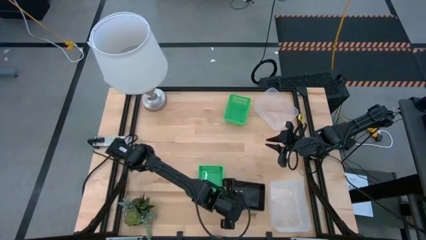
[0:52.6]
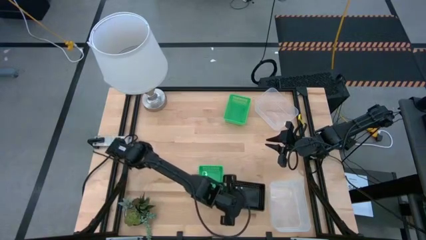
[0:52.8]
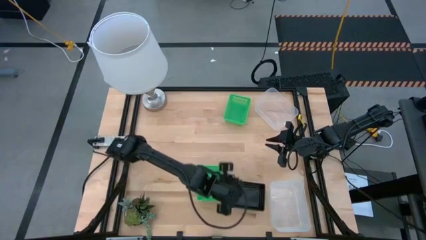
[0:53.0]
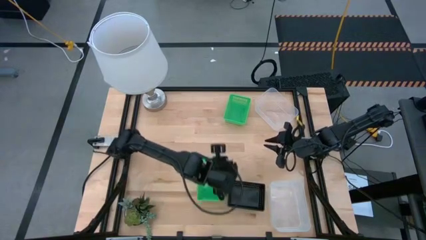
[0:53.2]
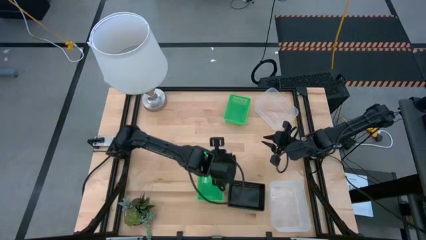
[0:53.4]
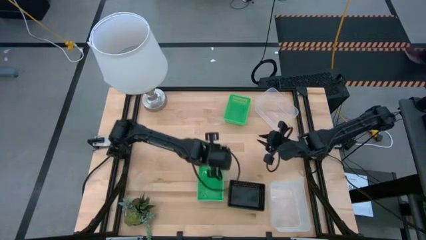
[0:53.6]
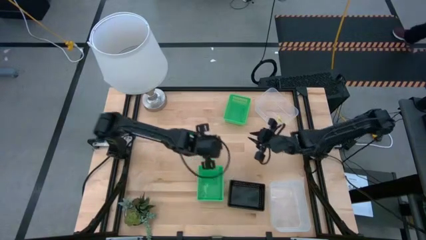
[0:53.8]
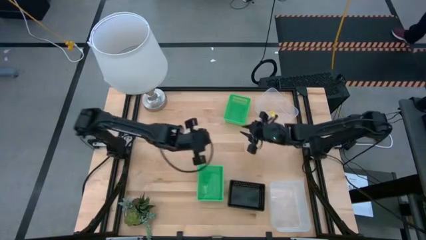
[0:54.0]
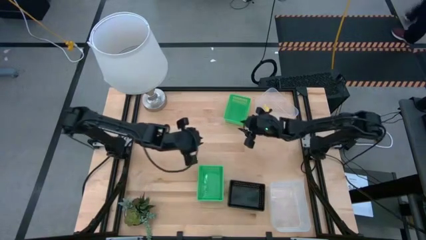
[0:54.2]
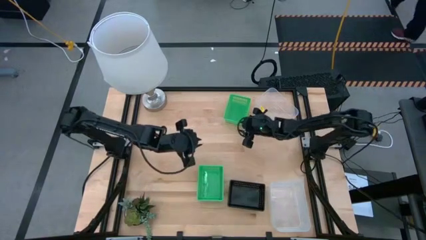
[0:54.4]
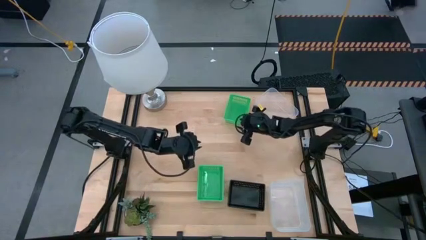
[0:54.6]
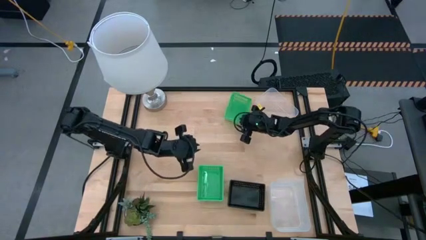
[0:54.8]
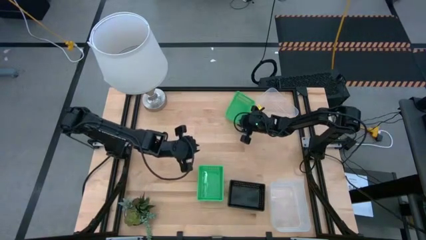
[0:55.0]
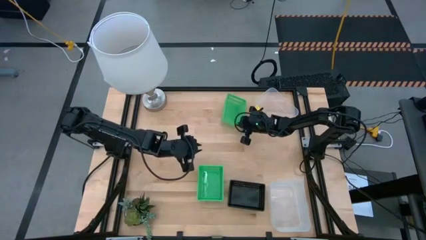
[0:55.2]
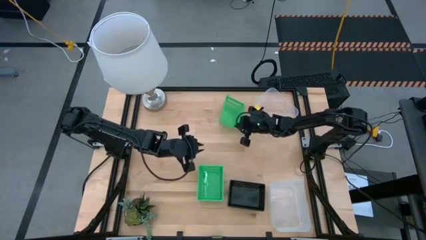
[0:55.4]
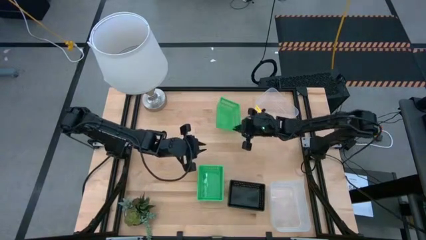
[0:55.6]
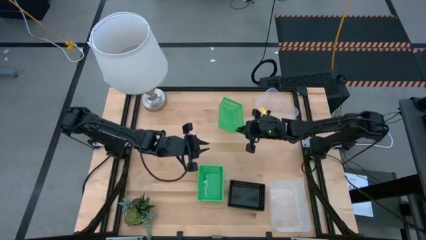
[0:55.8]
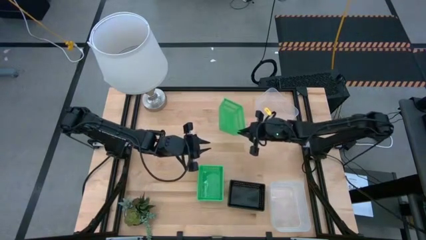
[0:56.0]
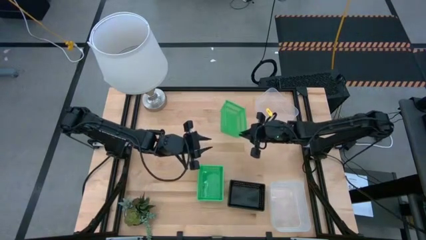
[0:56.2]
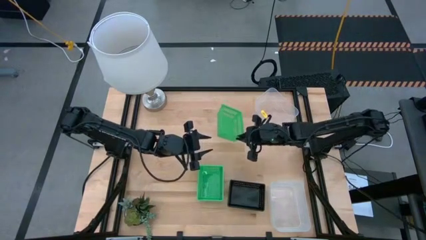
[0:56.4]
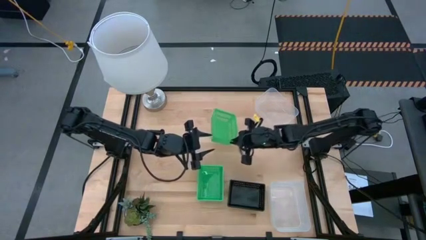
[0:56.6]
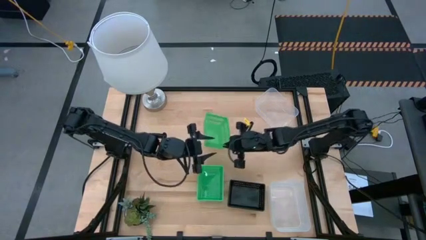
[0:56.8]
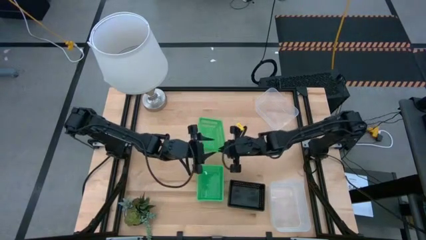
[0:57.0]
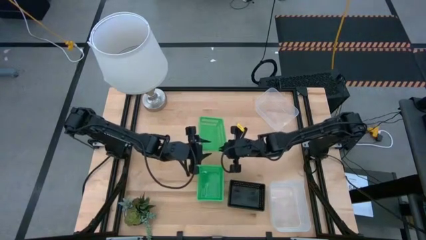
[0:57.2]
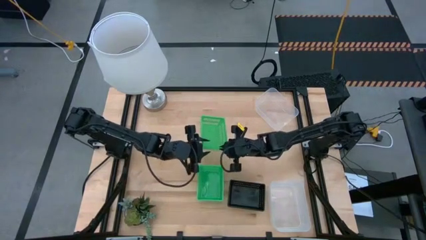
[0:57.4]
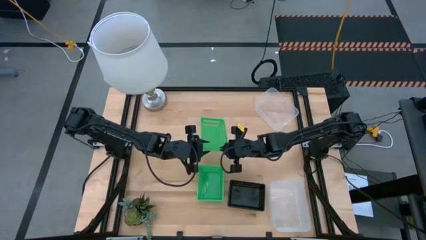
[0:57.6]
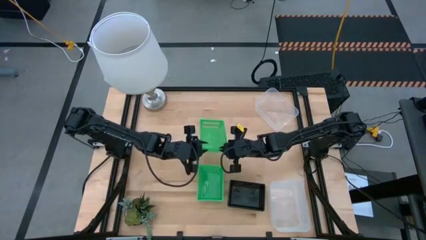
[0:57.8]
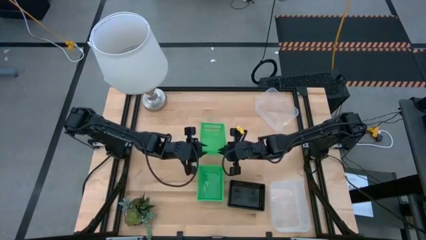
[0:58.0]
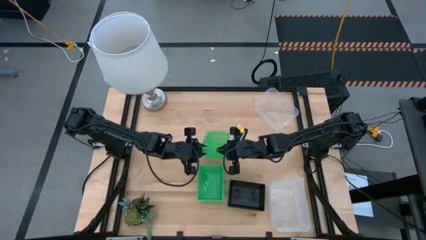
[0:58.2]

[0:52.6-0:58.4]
Stack the top green bin on top of the bottom stacked green bins

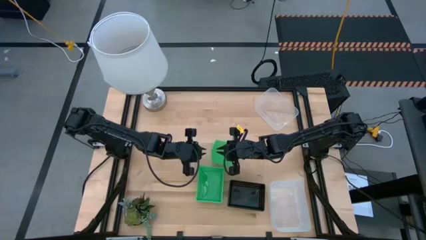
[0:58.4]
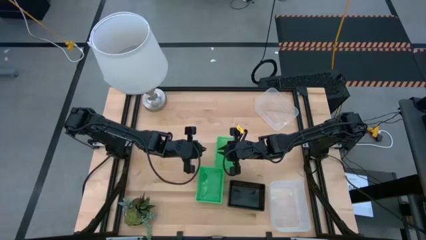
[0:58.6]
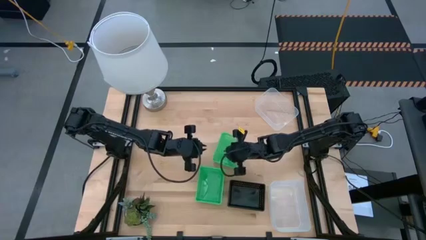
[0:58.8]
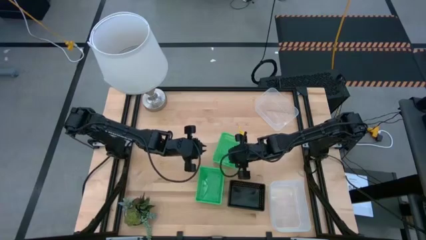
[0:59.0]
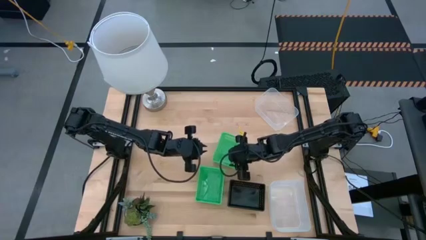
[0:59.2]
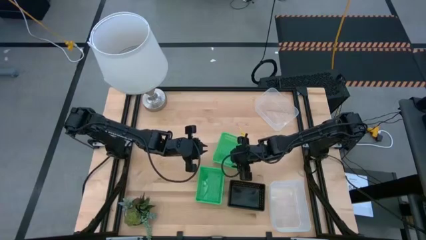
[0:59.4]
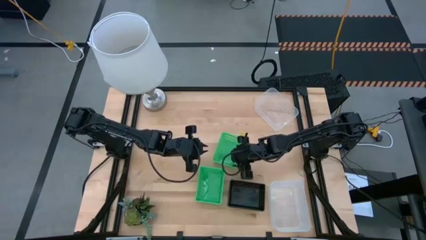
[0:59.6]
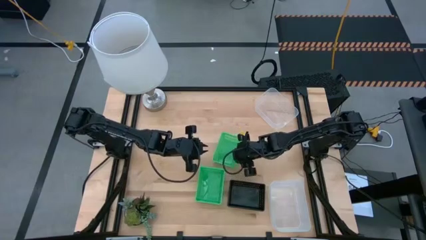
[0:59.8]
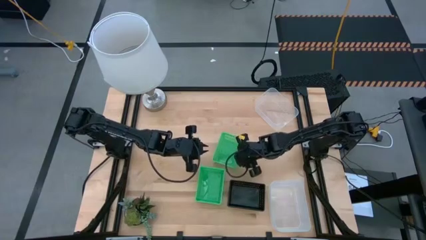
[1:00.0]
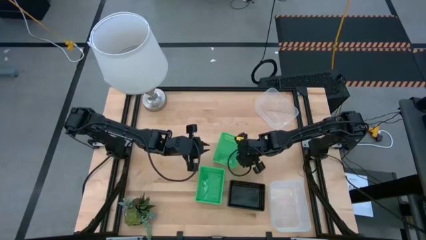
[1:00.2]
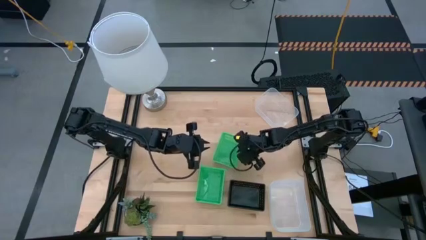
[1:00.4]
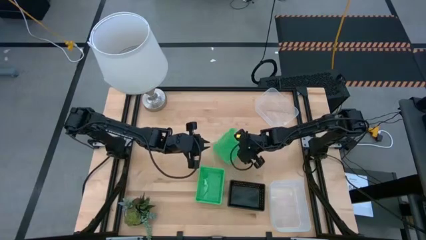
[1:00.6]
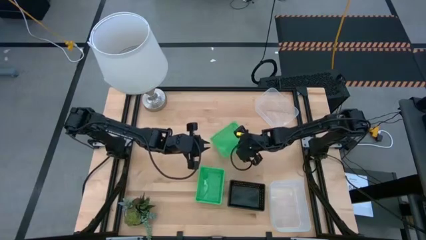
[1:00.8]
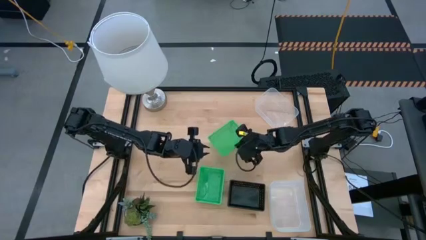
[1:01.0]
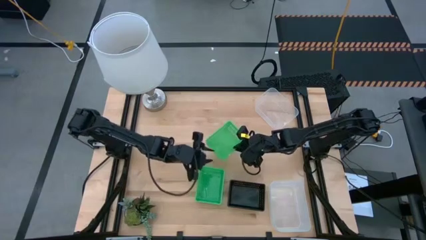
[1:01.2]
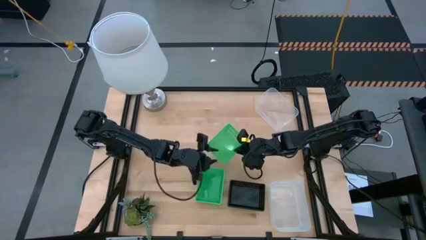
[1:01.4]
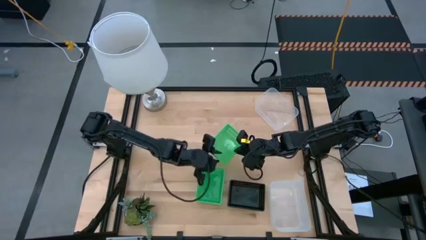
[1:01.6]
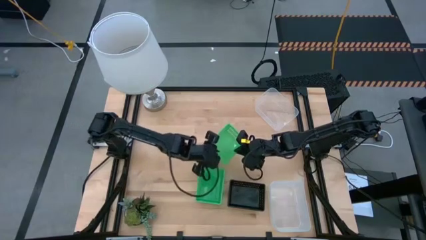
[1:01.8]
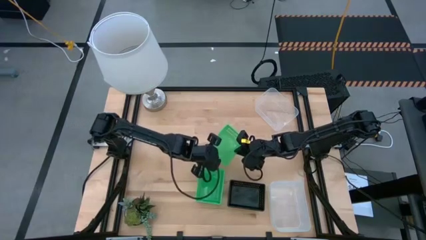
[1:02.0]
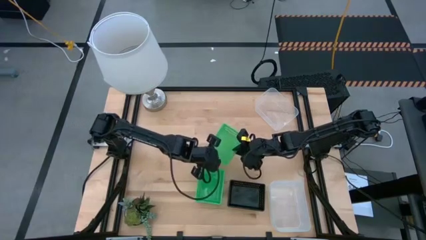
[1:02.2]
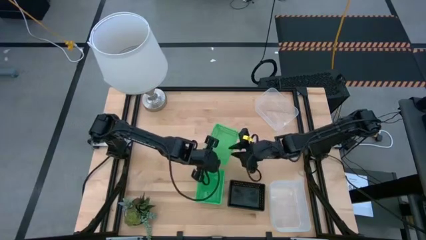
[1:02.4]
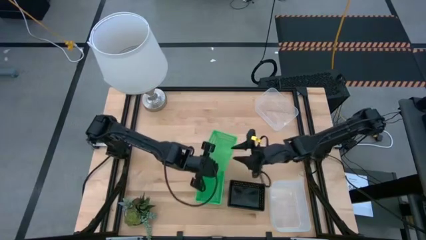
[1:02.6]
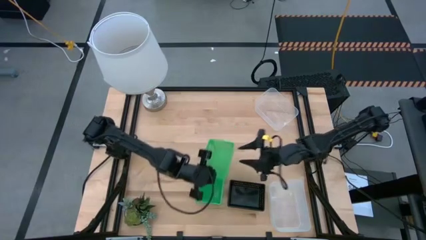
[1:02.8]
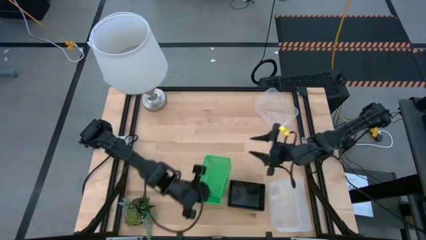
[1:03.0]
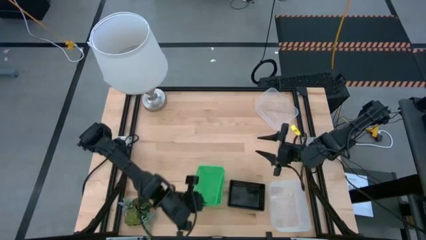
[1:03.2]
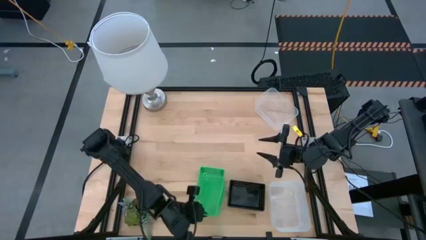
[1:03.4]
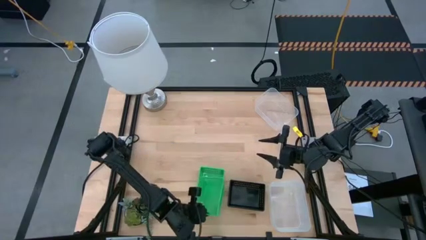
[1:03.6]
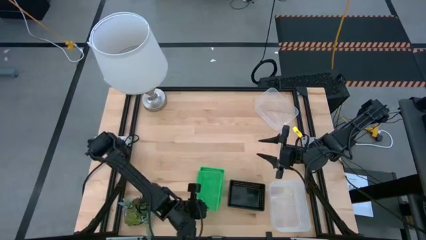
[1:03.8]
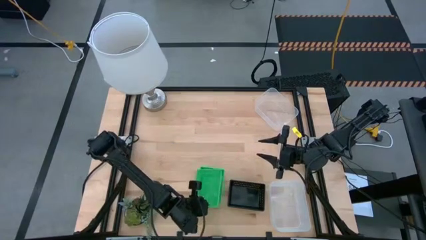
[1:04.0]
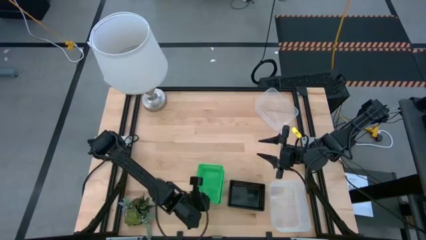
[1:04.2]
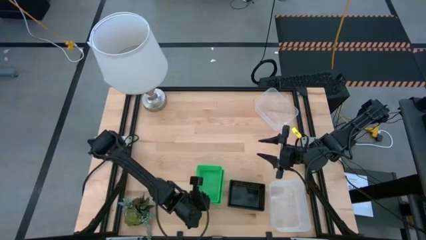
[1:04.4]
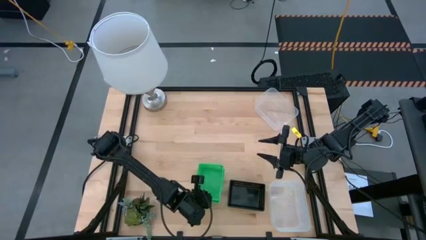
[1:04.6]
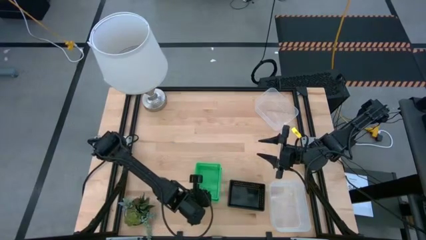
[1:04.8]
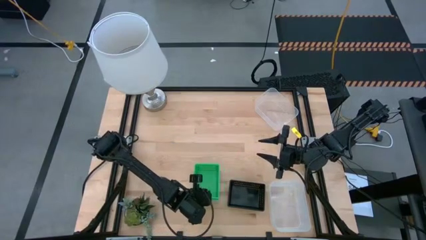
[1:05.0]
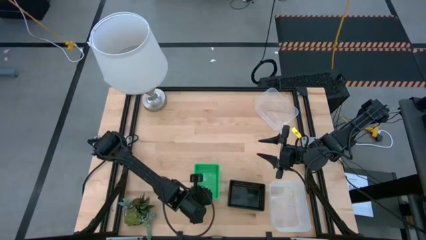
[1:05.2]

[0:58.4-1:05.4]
Stack the top green bin on top of the bottom stacked green bins
